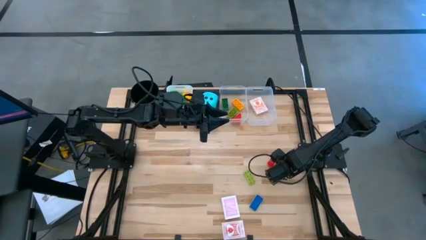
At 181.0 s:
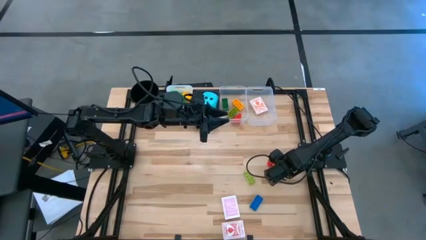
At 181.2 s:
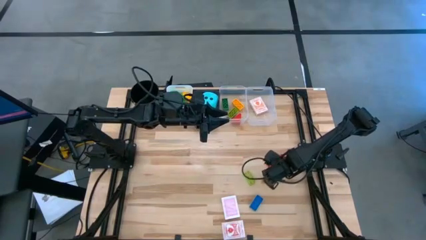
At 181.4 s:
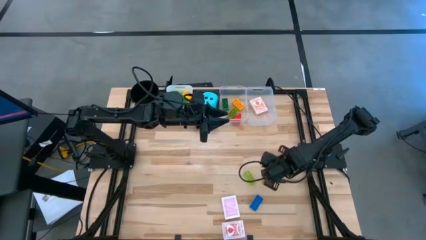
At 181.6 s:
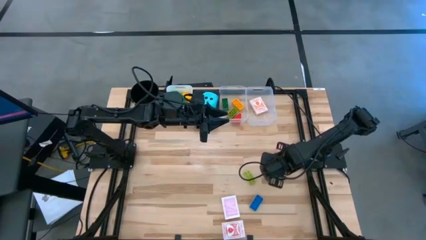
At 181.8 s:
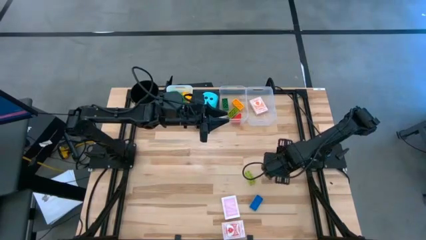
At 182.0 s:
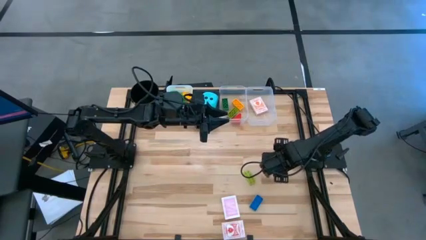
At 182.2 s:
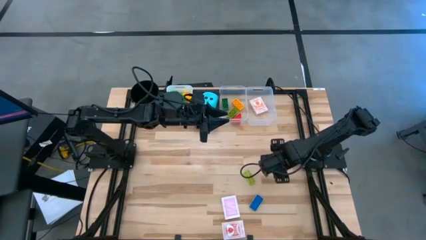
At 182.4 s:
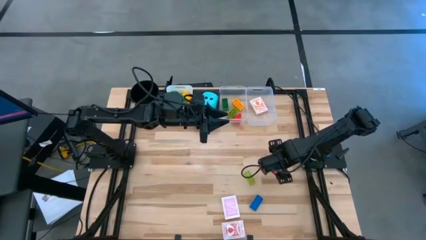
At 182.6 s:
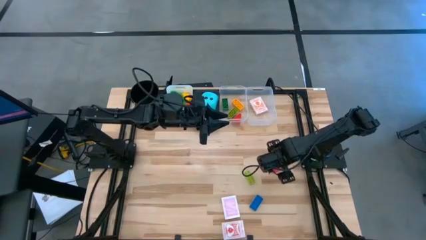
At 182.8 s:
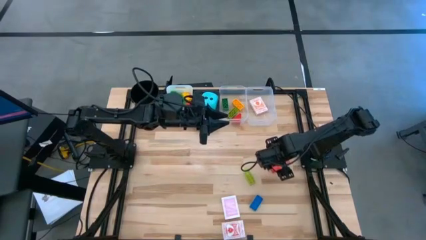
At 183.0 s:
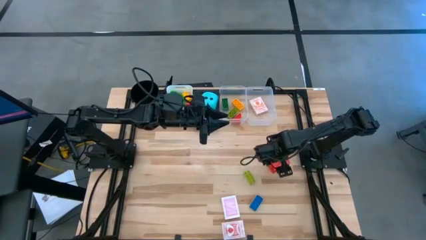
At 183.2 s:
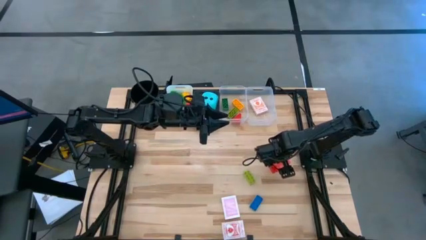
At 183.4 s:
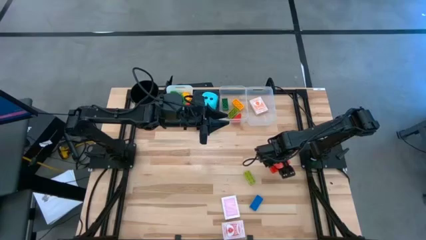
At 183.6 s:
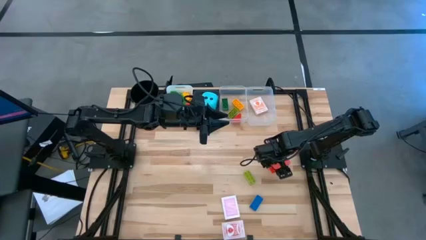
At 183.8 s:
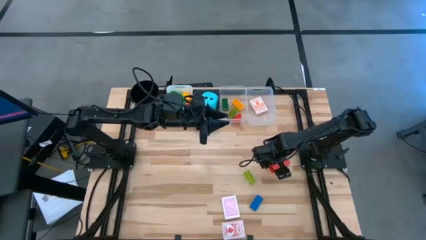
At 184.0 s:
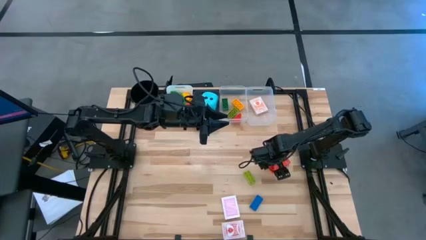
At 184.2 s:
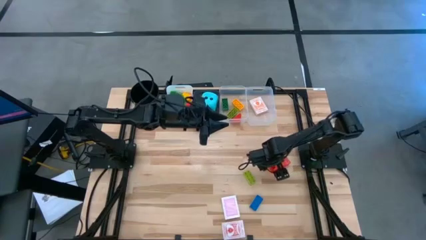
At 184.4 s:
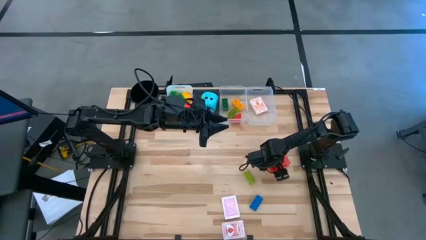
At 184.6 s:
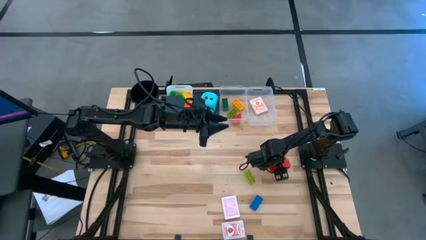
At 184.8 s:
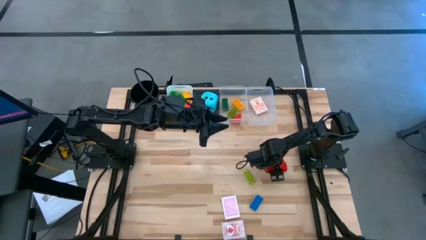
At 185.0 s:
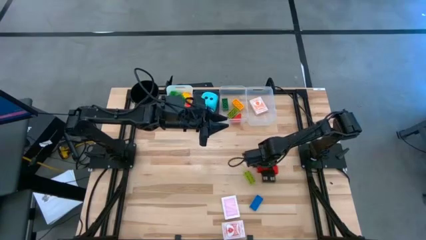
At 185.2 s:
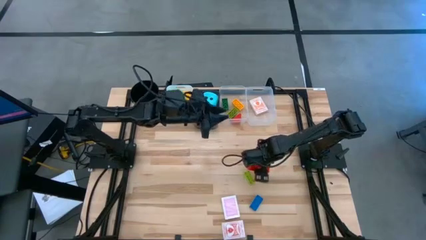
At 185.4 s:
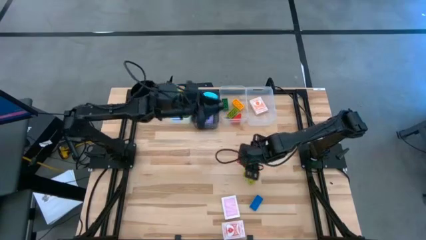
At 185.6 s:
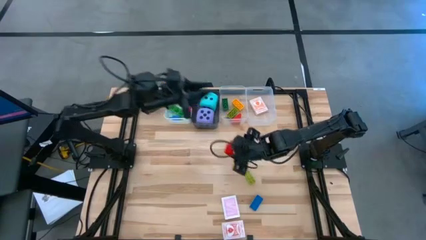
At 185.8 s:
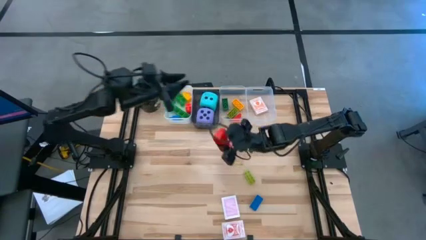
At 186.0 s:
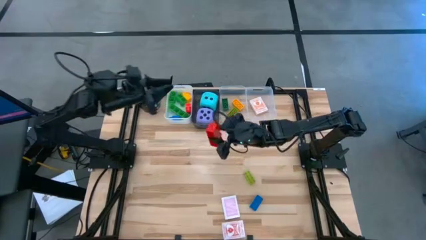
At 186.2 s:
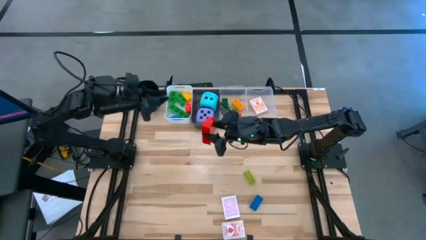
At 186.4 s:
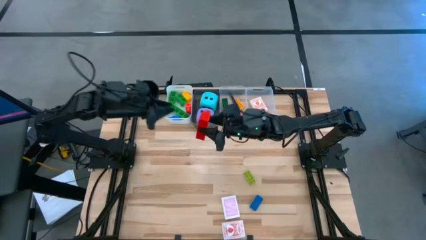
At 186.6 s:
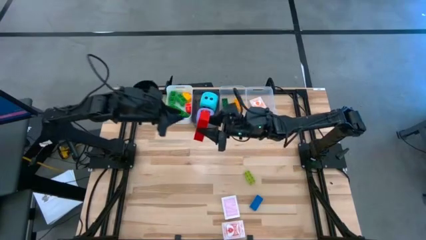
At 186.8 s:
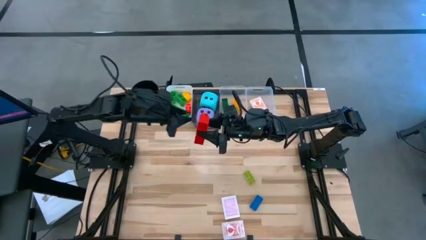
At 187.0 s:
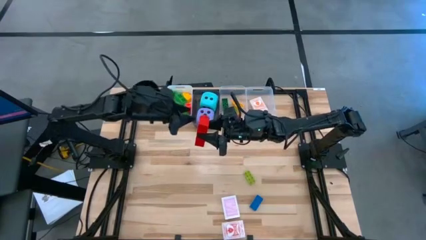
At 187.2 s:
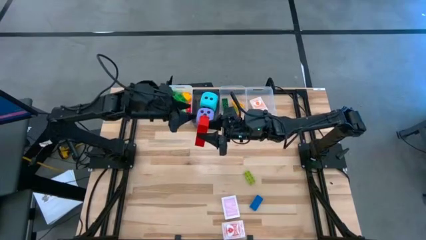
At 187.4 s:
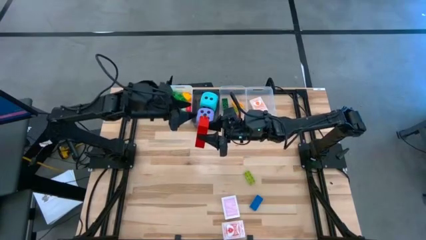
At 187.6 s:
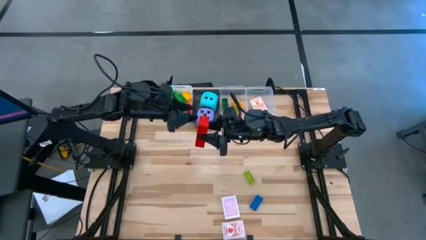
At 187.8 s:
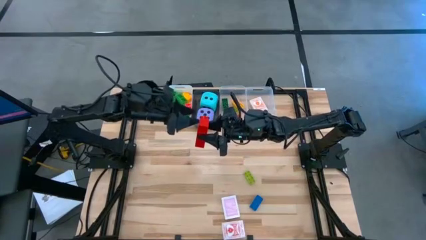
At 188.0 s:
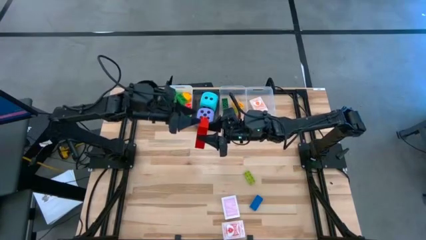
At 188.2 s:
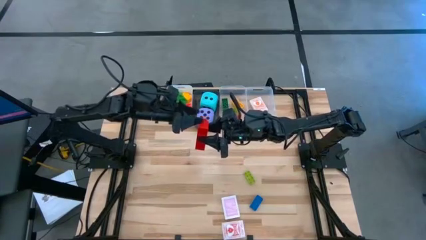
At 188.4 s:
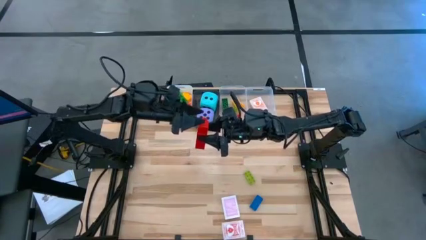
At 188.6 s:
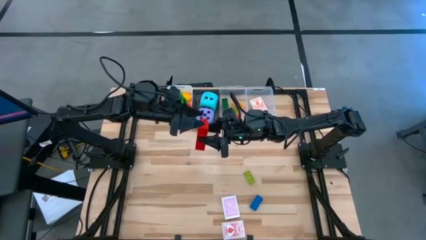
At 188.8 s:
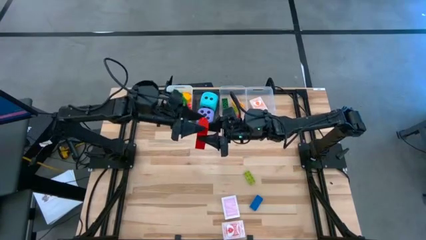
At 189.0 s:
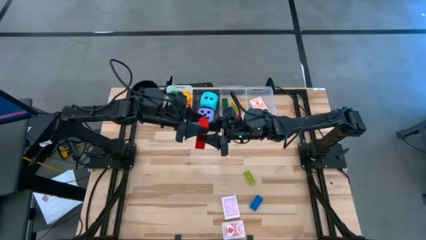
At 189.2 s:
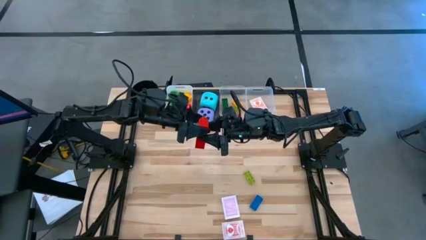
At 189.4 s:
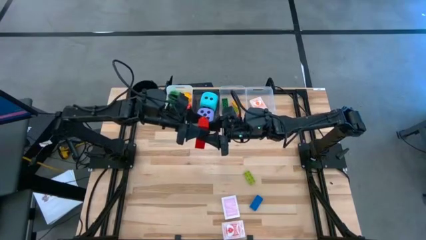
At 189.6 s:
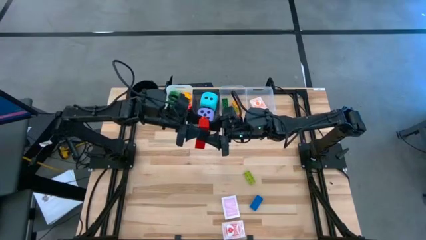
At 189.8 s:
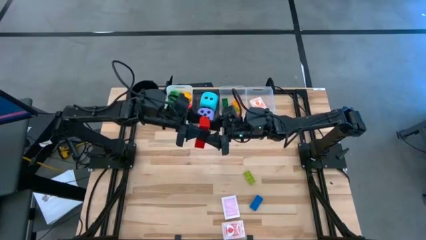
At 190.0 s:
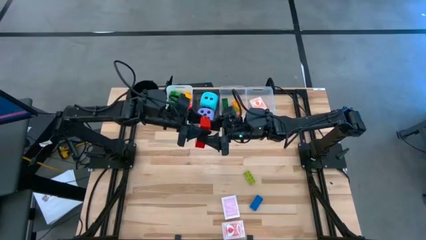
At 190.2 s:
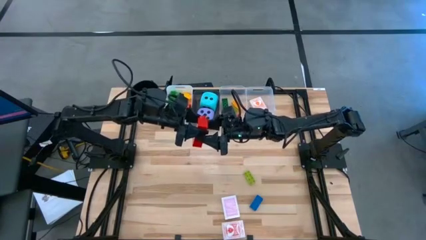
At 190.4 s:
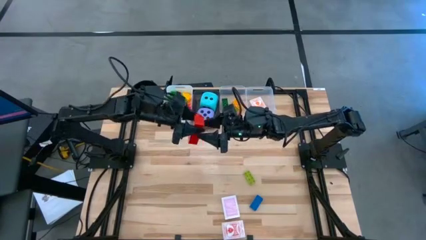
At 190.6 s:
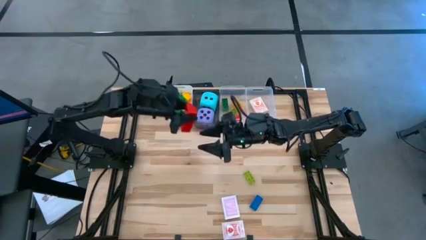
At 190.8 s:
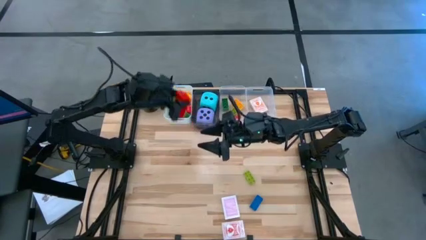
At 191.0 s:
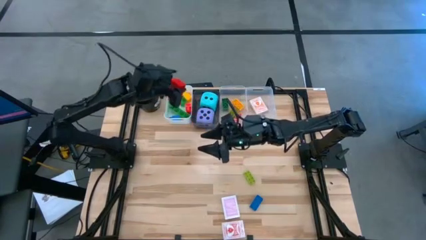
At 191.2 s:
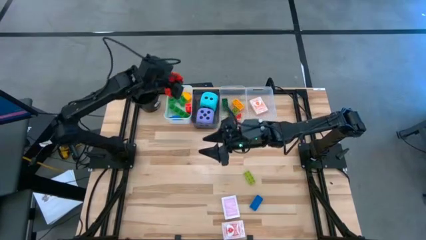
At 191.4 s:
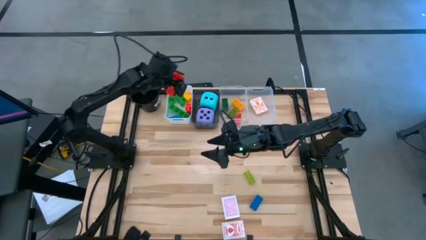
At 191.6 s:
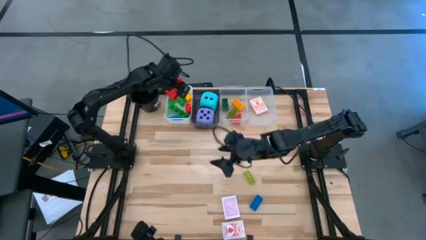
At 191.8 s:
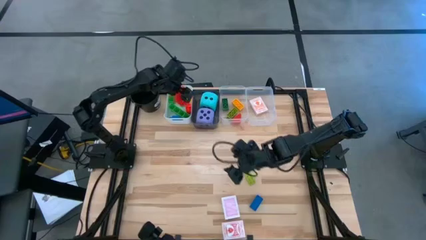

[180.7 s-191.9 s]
Task: Pick & Place Toys
Put the big red 3-stud game piece into the white bin
